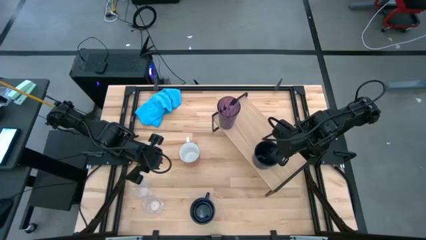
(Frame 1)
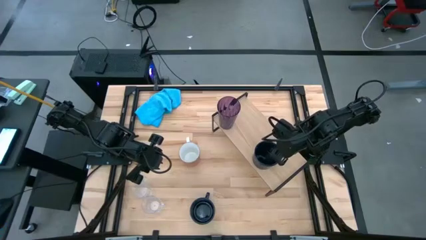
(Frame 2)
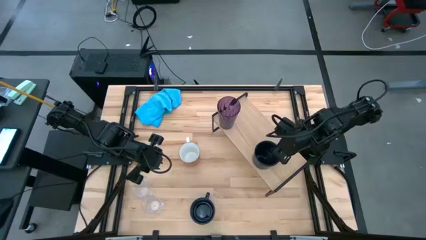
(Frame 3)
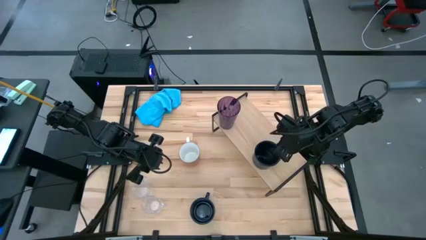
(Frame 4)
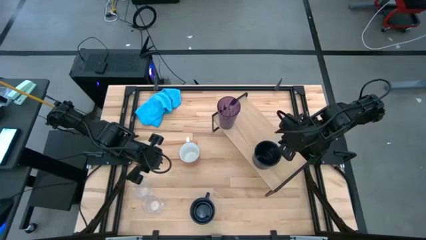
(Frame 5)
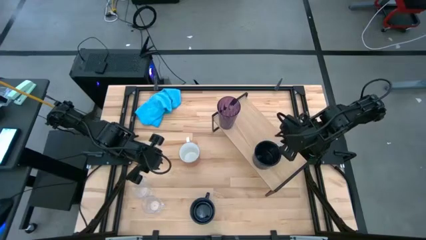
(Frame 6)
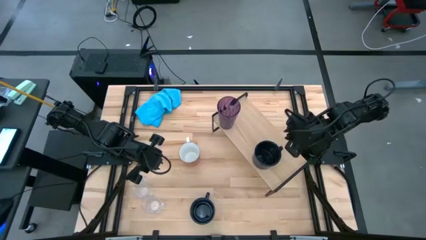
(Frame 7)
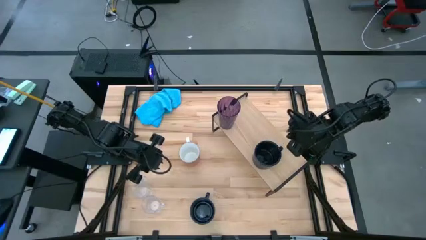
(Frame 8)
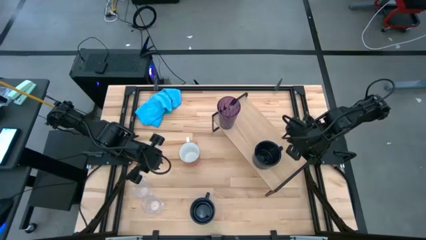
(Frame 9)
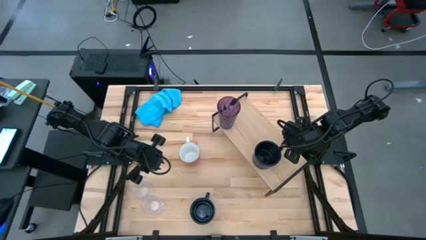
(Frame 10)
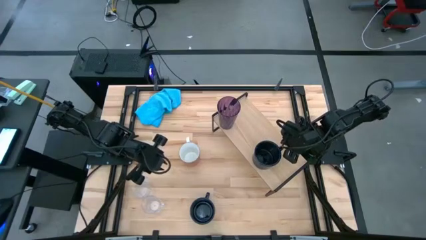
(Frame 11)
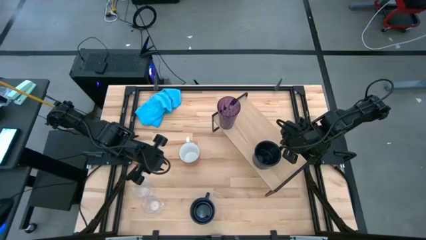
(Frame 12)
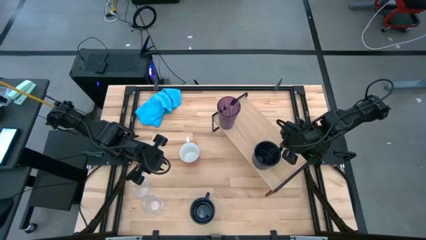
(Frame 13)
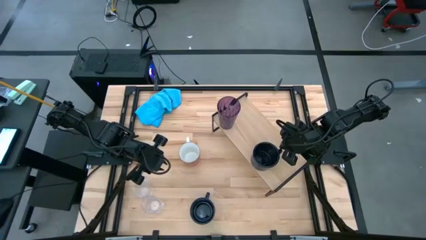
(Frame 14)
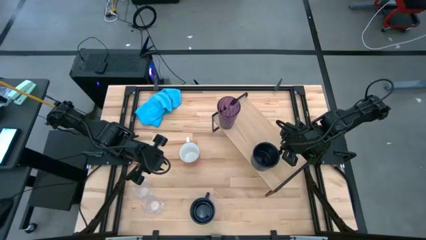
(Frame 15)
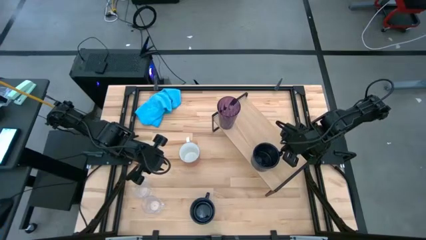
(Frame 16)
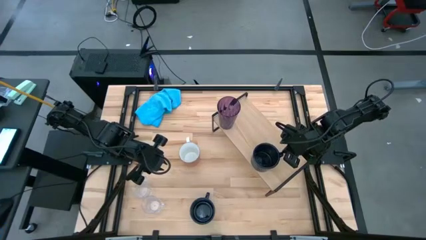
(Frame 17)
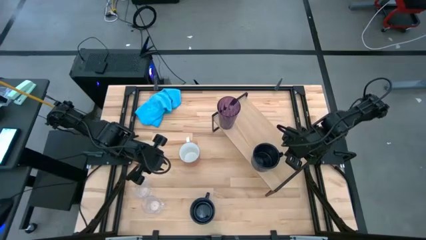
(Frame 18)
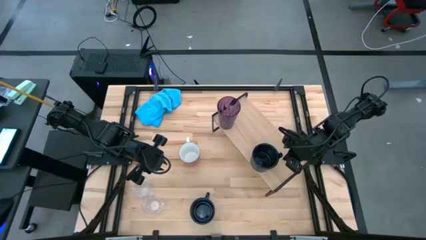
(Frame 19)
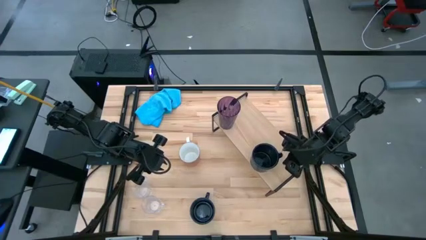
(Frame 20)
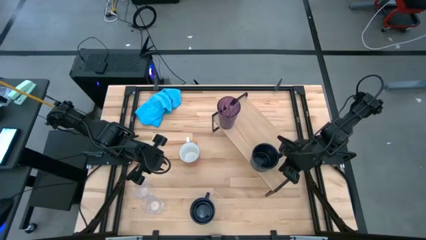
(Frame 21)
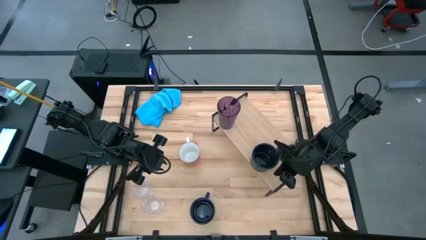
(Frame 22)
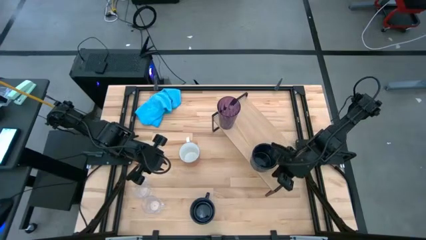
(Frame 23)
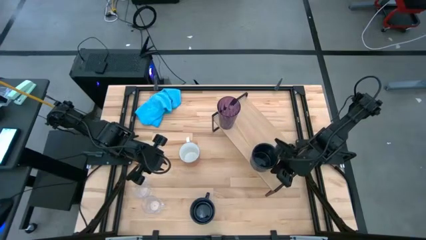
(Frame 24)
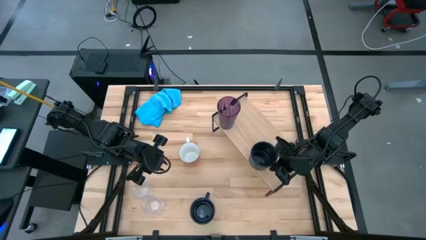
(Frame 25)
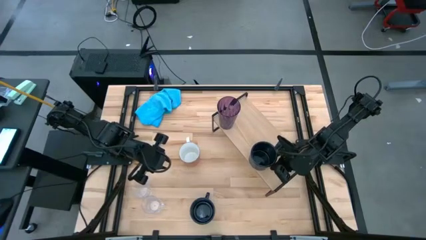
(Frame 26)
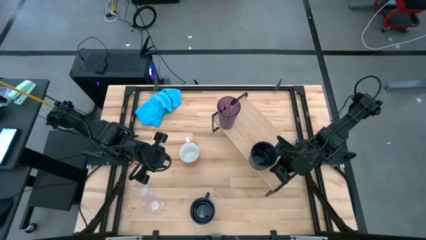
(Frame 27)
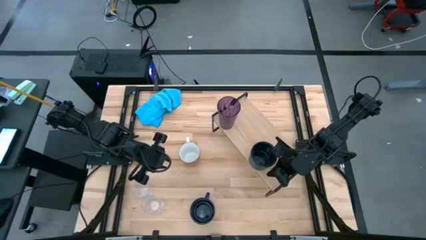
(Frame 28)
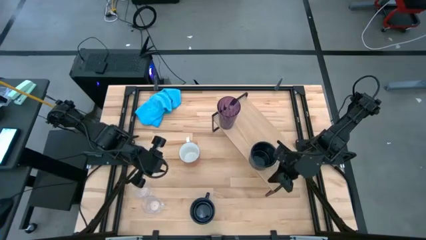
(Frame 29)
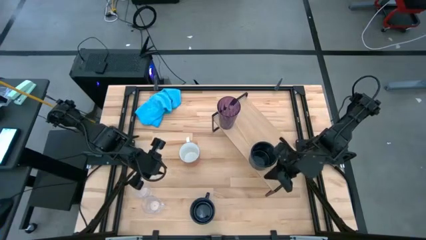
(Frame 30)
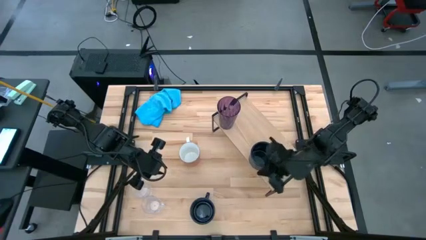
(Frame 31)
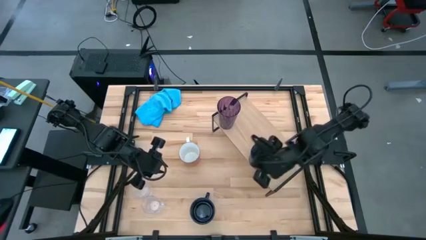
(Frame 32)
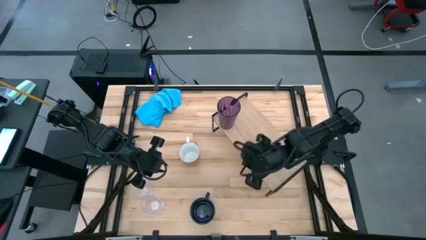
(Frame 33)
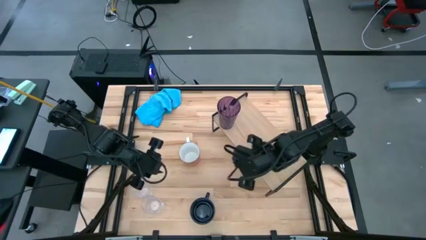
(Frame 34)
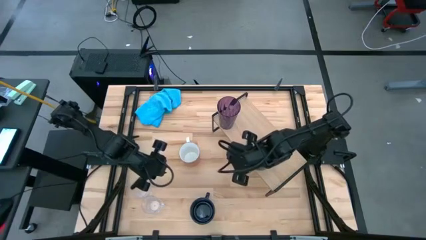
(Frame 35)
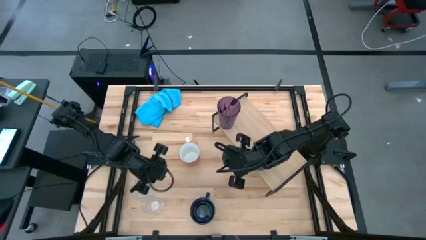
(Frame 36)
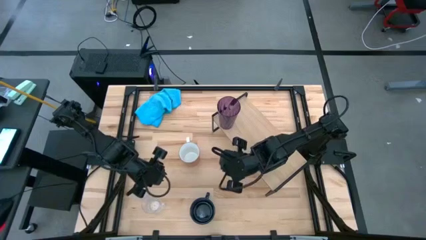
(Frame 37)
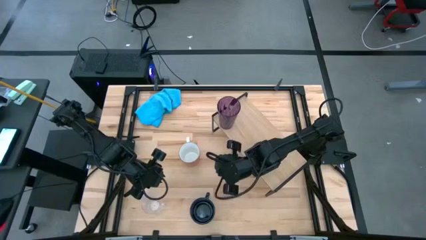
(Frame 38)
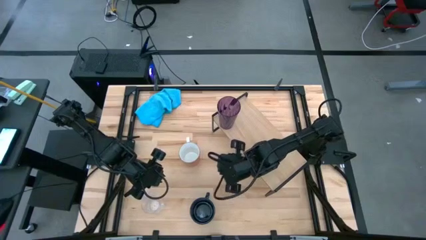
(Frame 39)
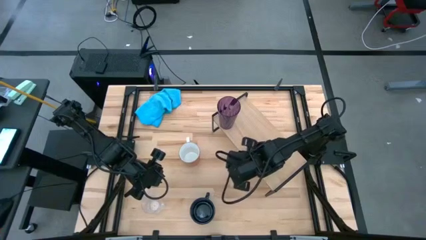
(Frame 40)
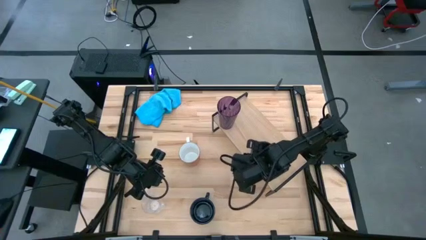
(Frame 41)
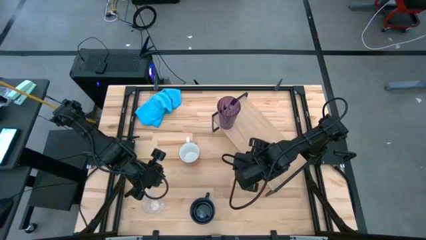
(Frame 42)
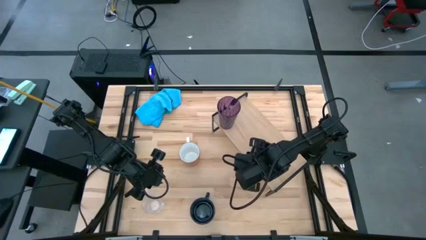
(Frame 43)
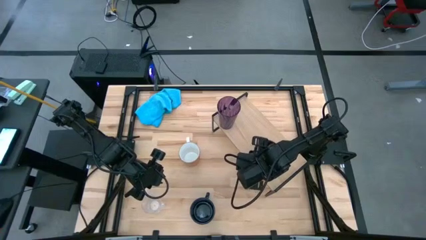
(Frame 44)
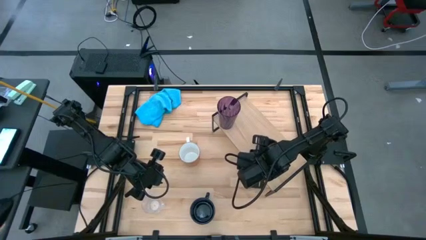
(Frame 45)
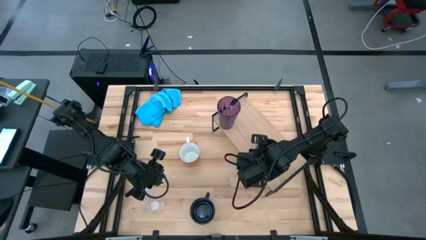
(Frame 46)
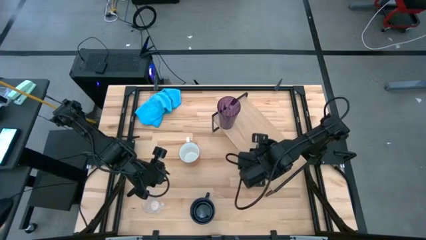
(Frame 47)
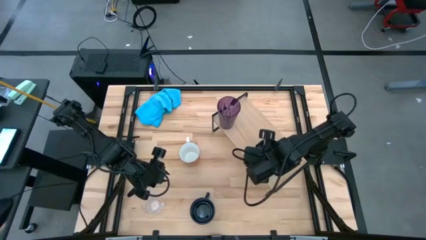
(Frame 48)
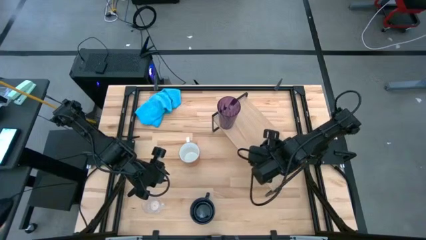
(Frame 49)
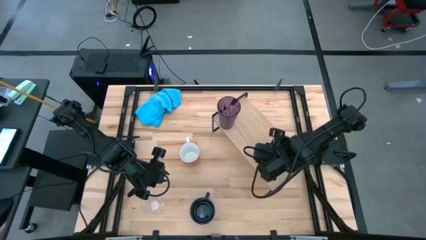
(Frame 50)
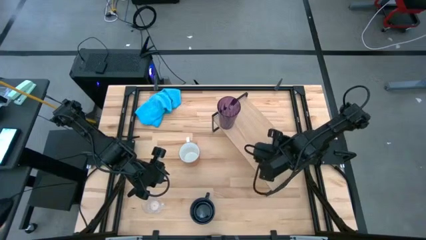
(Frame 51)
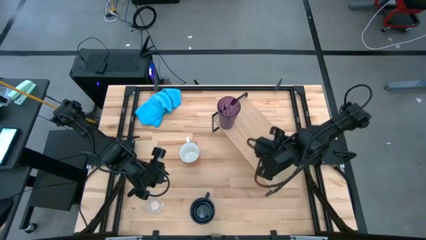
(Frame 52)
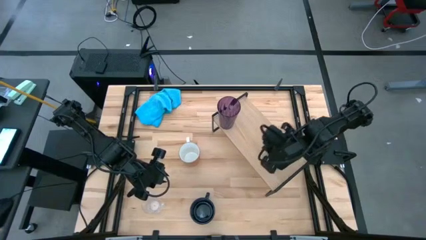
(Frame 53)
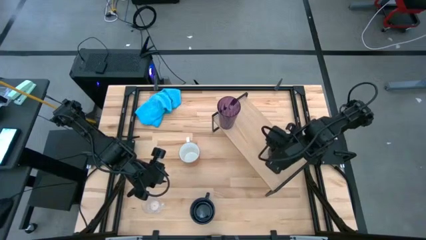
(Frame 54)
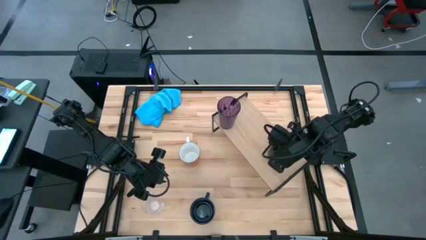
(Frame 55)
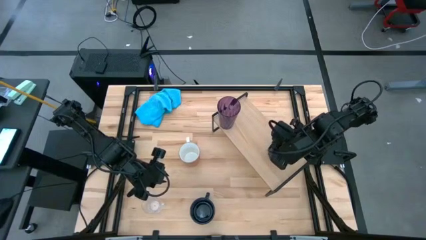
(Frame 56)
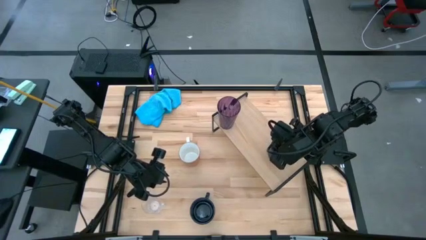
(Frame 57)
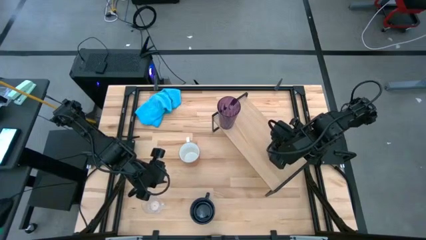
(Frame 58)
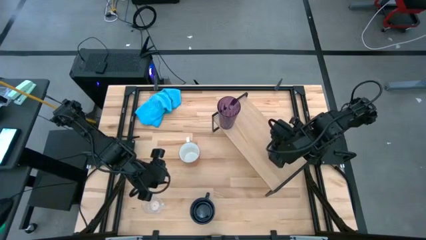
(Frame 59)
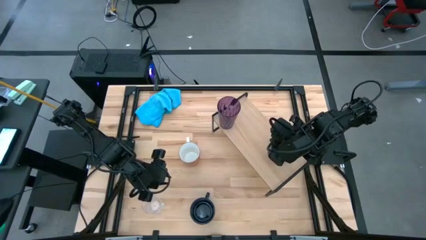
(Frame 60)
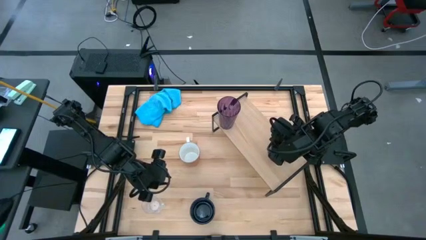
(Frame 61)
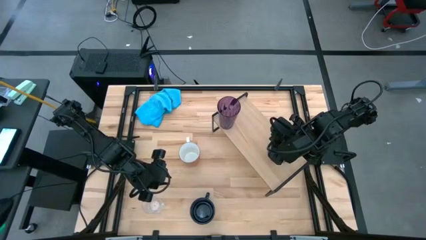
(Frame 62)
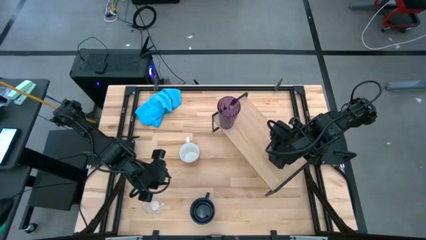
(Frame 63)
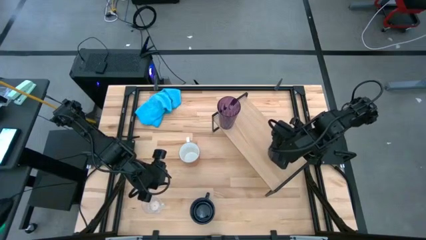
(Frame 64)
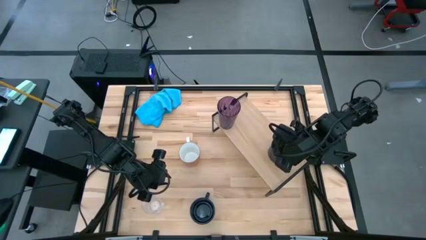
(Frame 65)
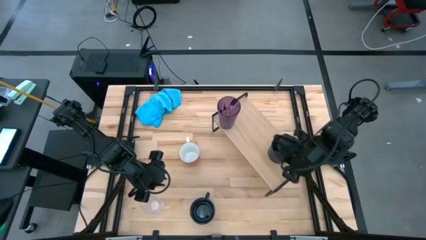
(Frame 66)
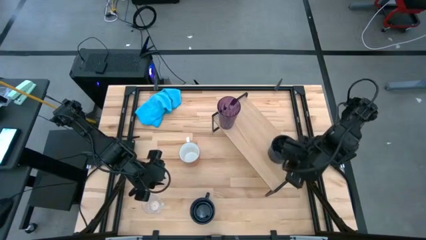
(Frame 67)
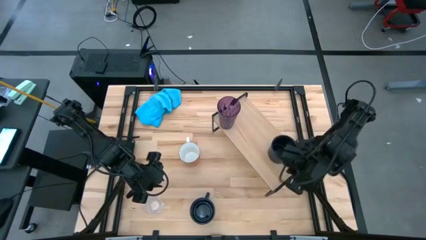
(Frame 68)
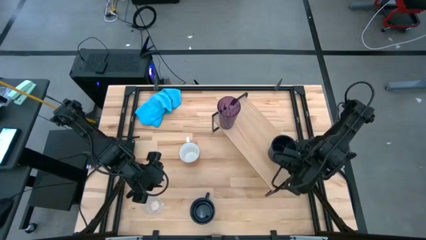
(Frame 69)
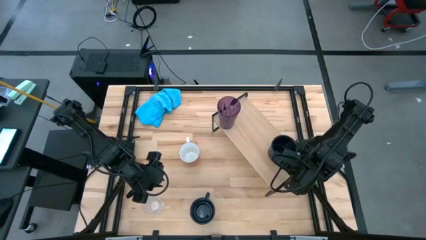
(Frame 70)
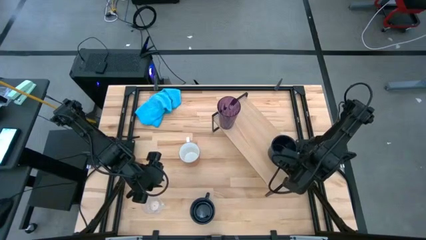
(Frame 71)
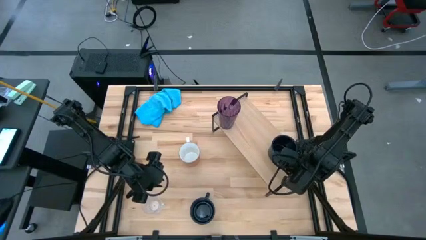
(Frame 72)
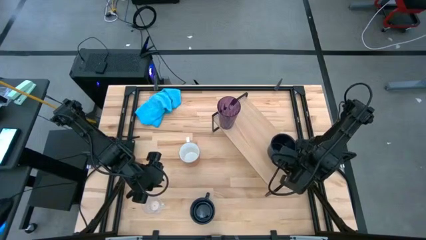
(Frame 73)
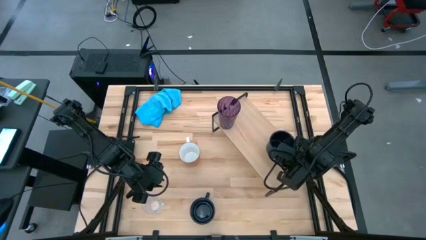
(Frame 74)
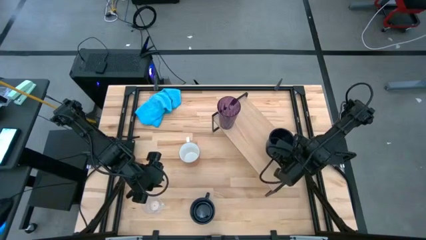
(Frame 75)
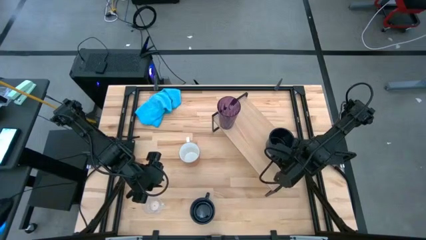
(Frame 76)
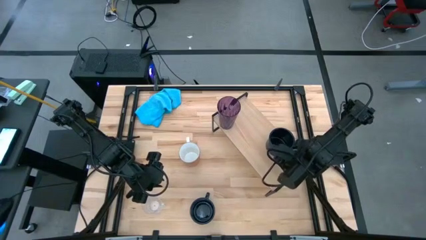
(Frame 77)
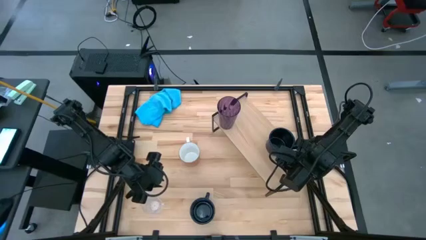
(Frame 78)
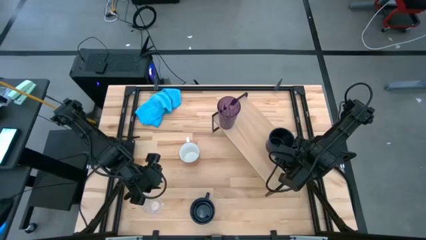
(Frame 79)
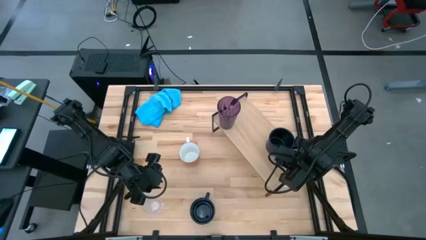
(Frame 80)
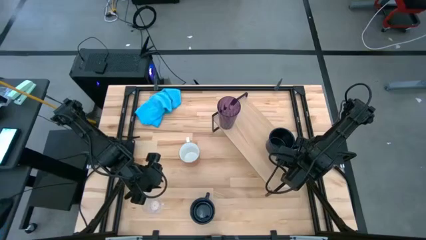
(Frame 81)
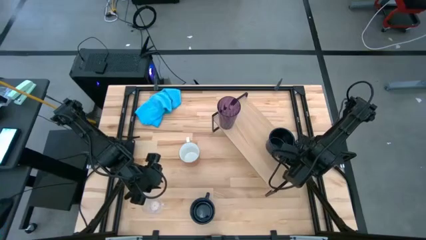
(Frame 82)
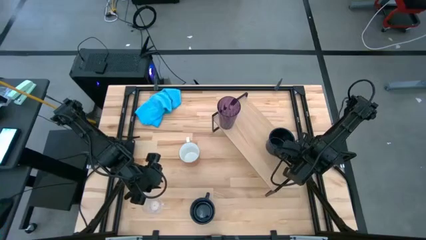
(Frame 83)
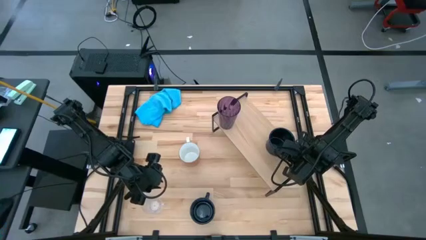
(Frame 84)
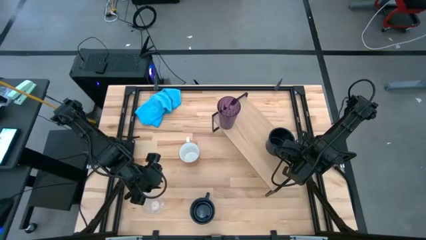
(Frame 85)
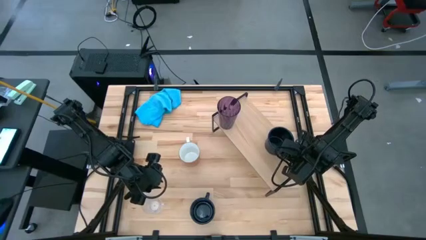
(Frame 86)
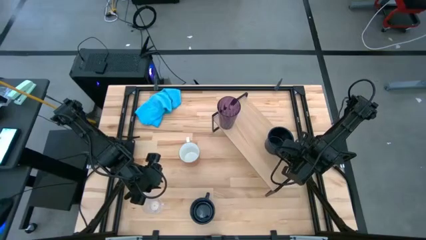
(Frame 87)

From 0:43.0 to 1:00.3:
Task: Stack small to large cups/mugs on shelf
Put the right black mug on the shelf
